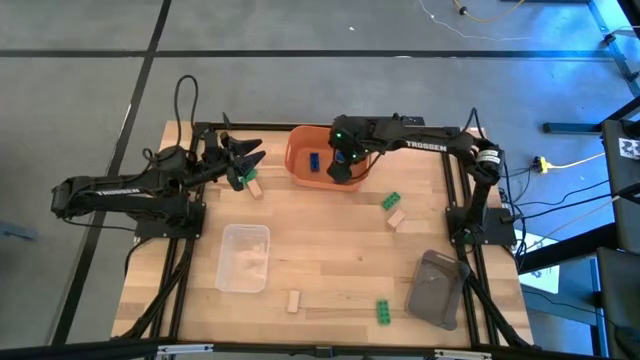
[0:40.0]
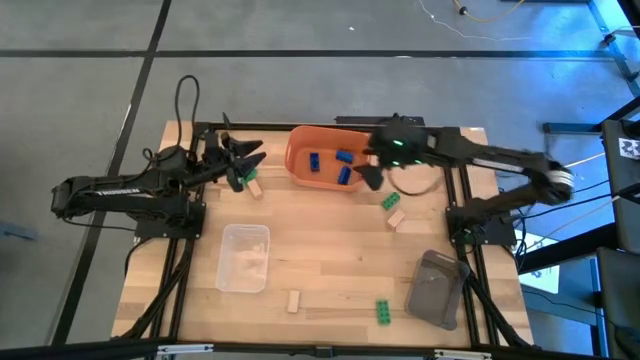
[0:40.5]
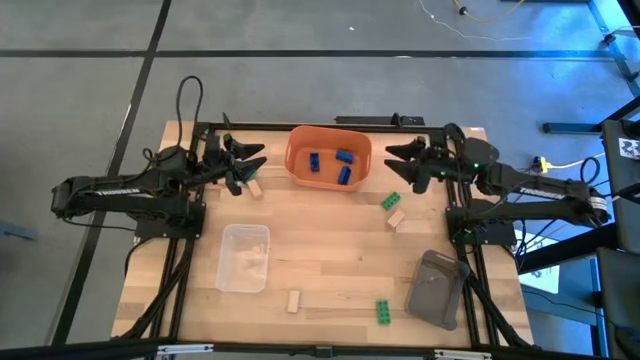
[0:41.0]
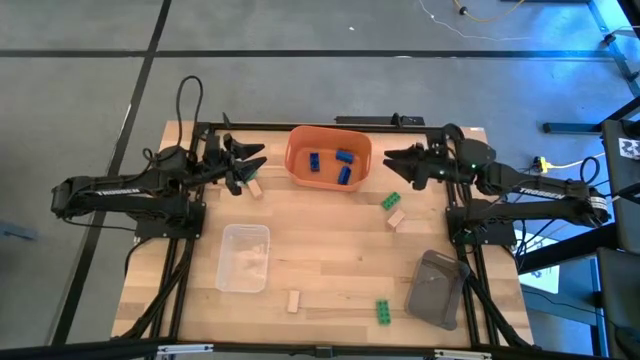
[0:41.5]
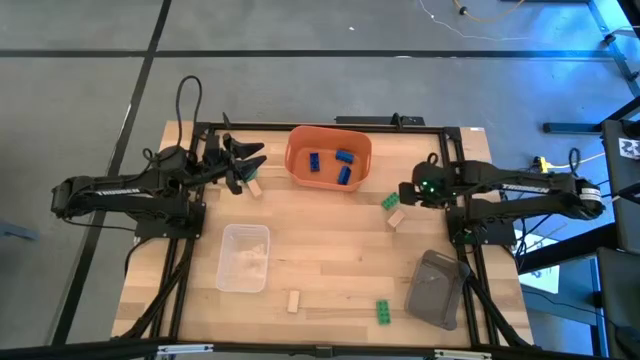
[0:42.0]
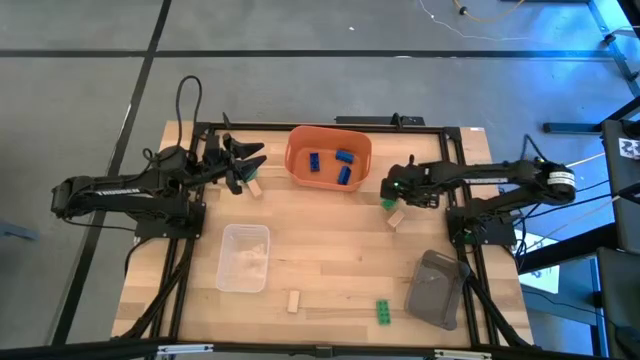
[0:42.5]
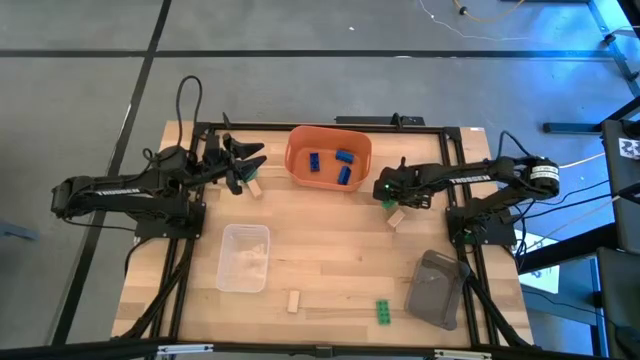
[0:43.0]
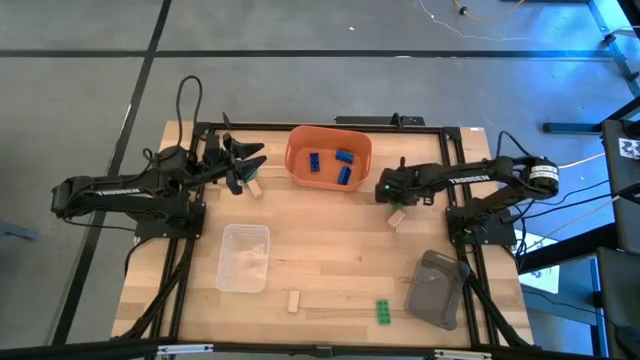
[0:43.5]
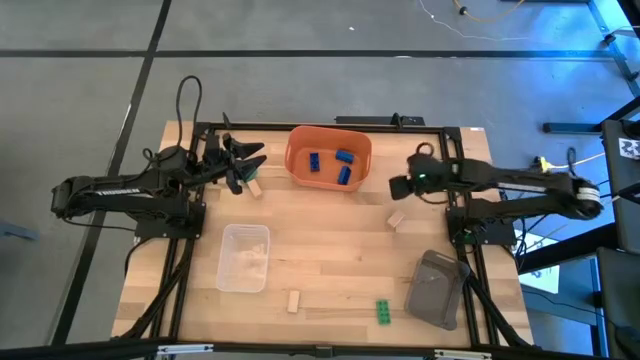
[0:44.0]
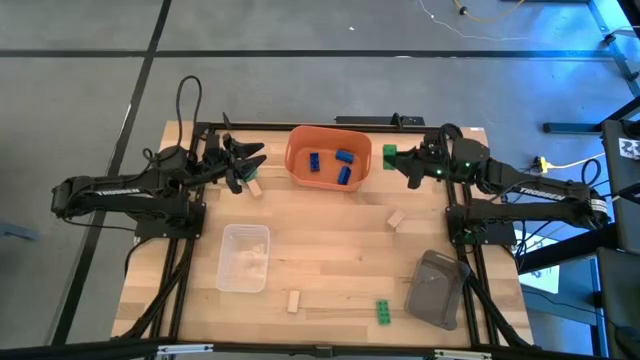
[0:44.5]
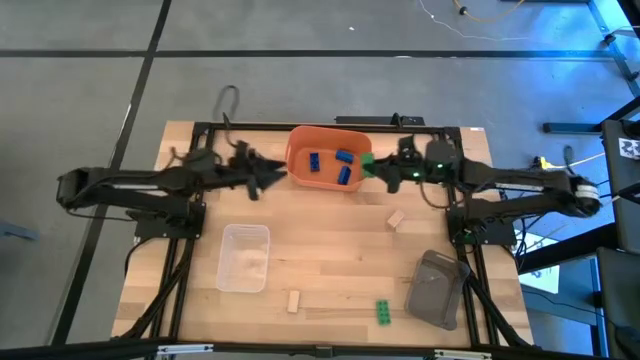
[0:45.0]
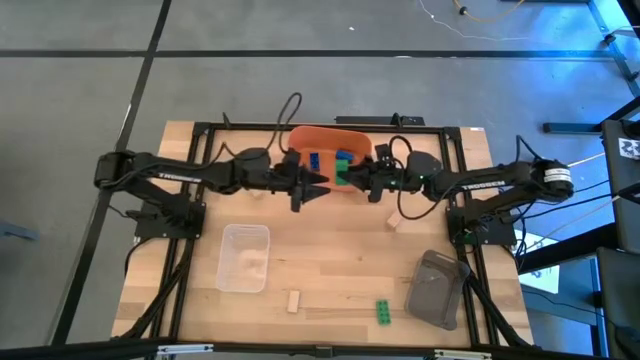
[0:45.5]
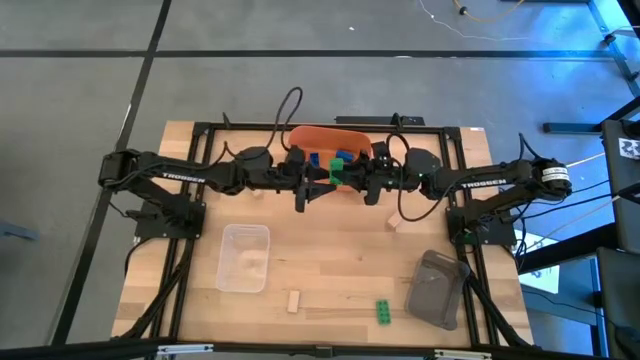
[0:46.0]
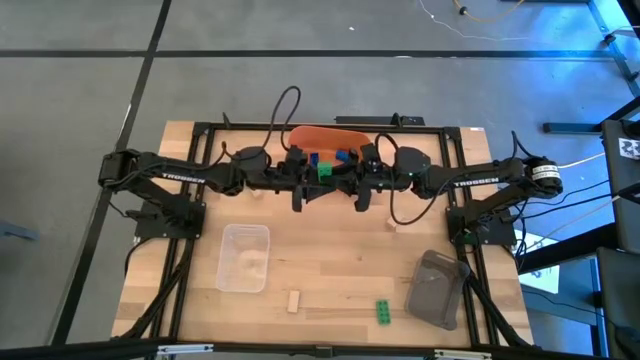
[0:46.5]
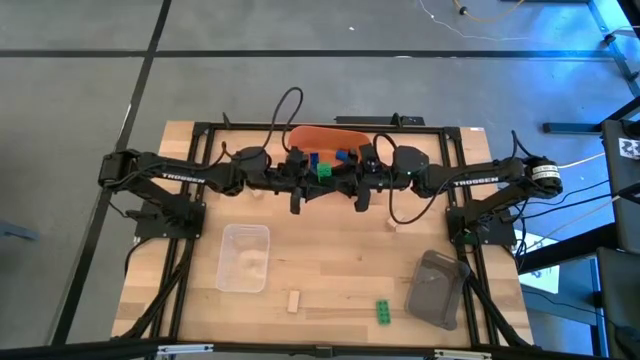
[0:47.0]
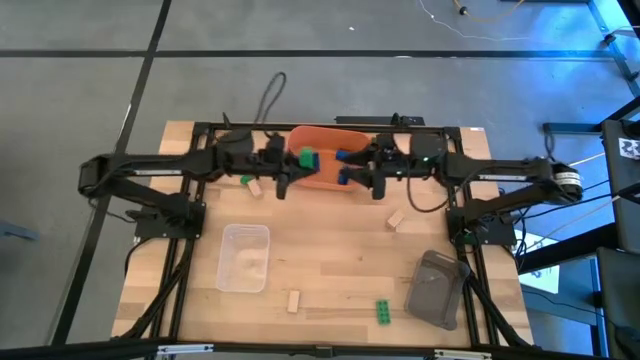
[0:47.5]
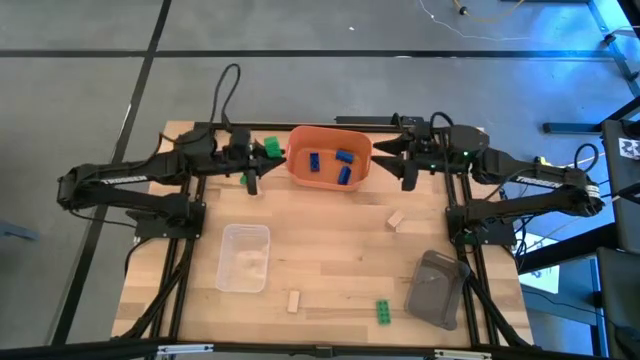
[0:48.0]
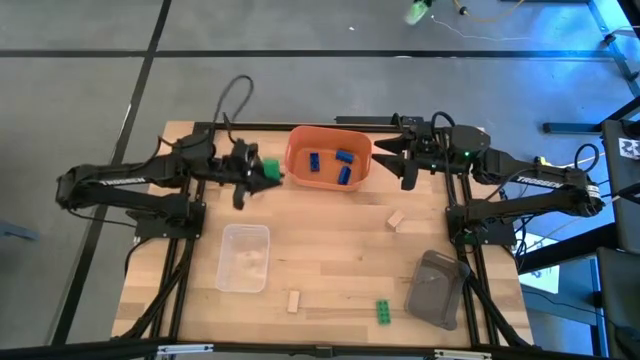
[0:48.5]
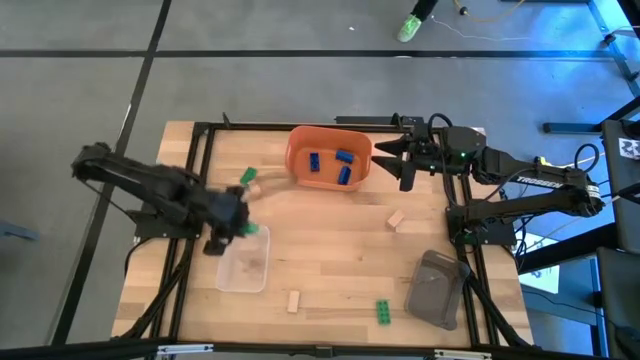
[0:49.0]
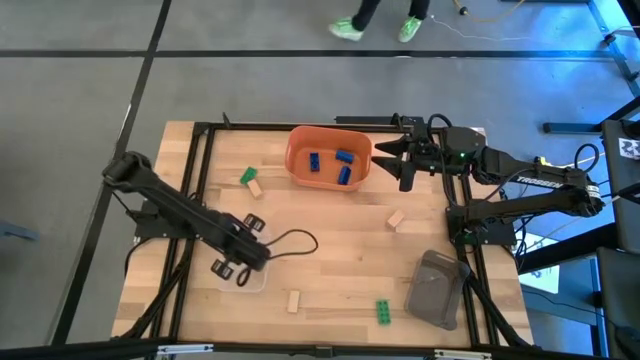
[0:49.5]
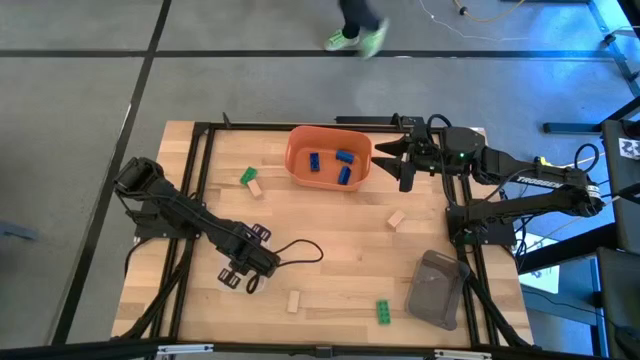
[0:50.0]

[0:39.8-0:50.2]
Task: Sort & place blocks by color
Put the top right green game piece into the transparent bin

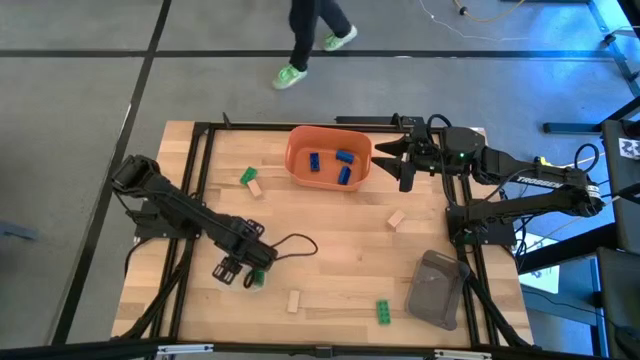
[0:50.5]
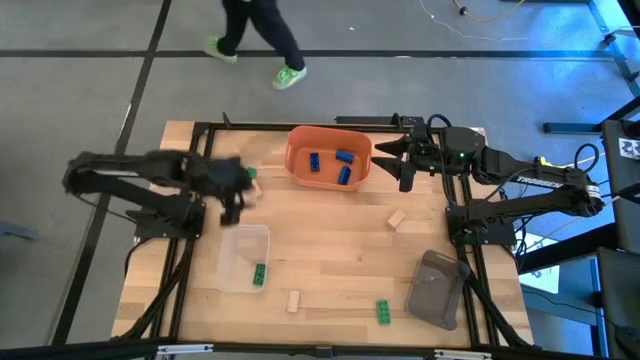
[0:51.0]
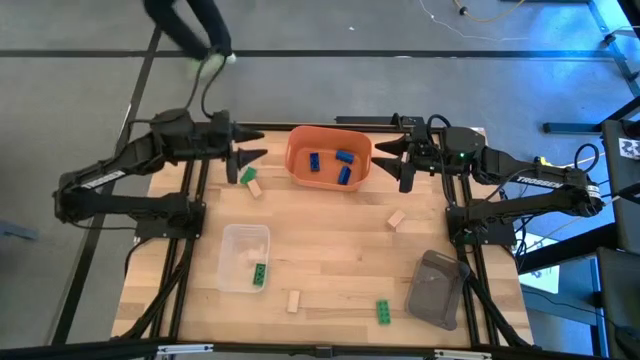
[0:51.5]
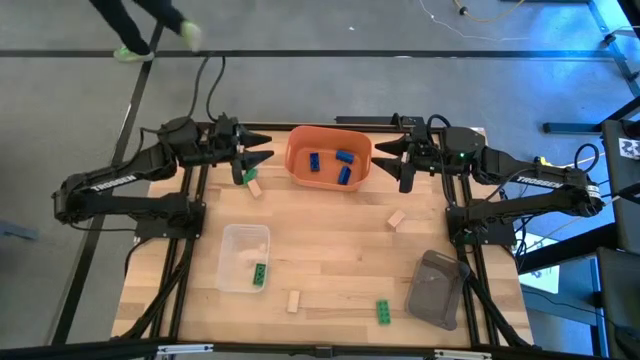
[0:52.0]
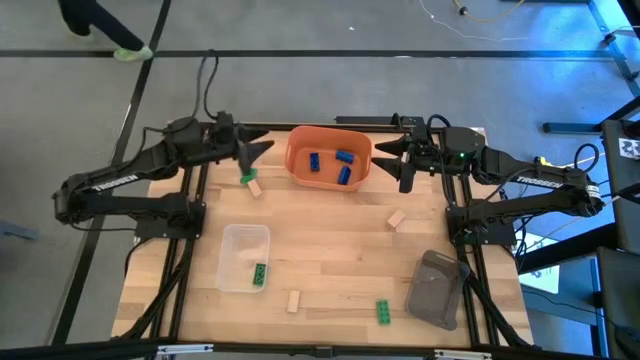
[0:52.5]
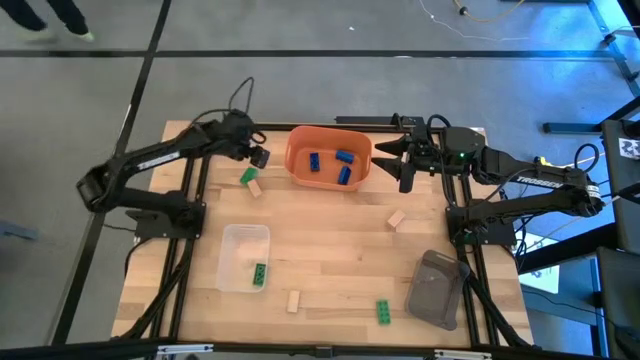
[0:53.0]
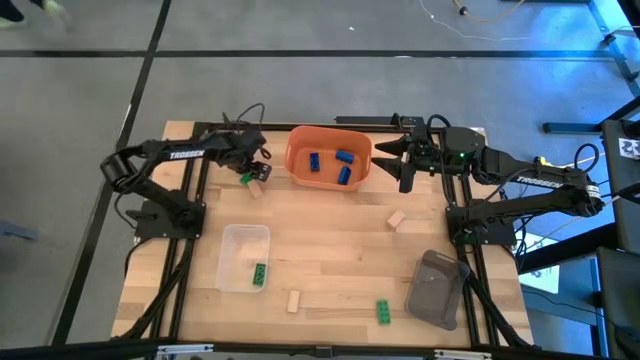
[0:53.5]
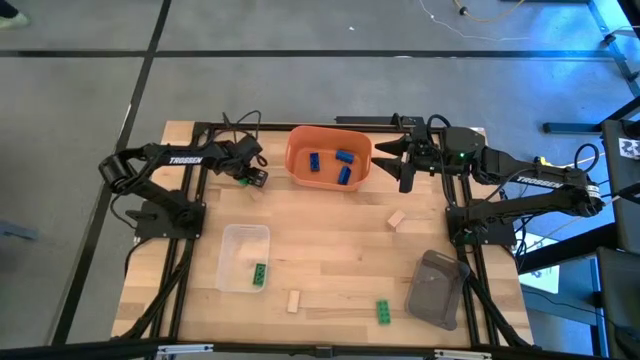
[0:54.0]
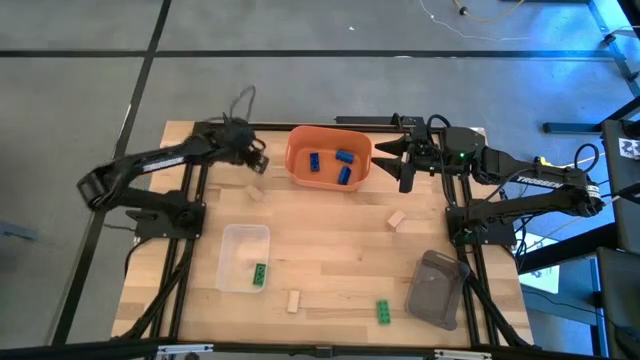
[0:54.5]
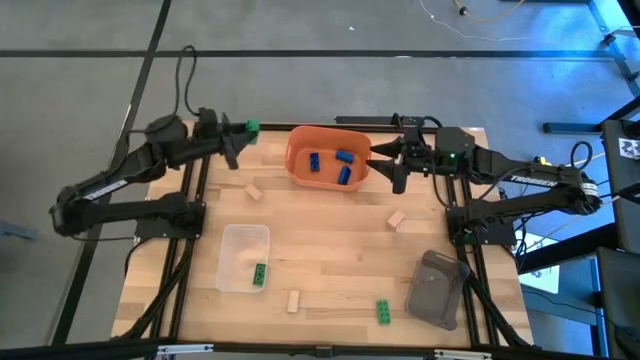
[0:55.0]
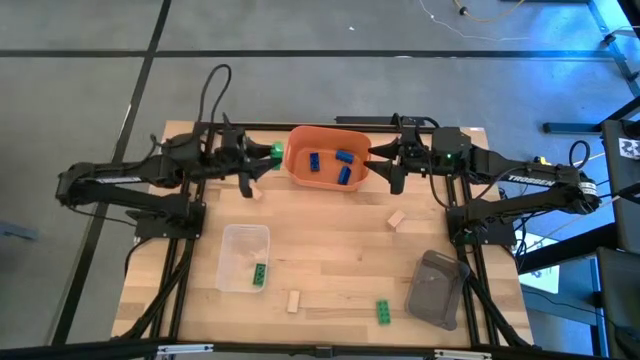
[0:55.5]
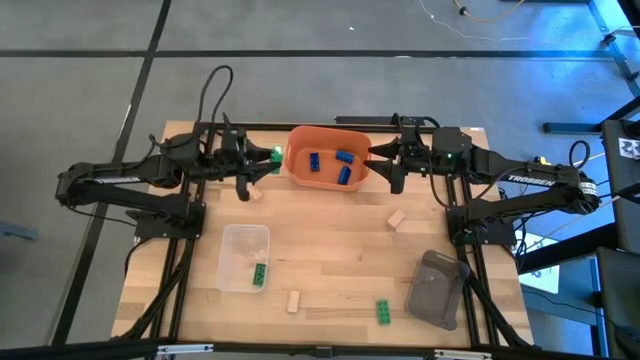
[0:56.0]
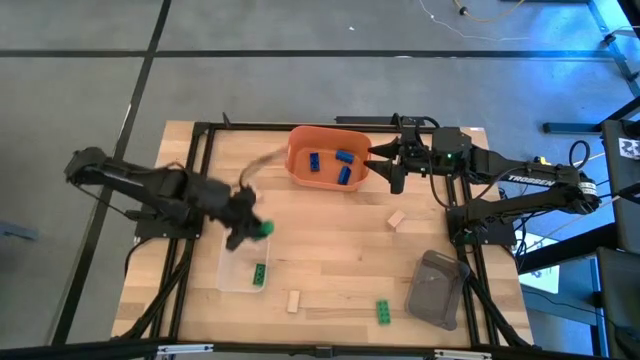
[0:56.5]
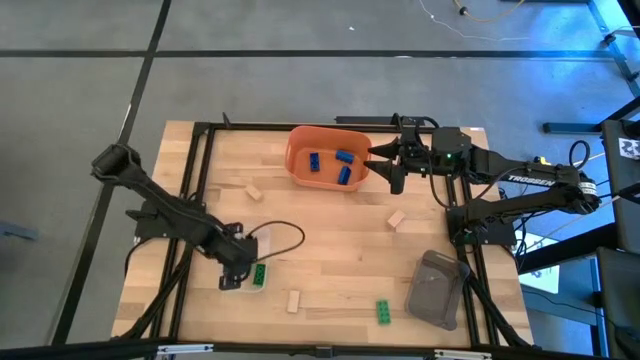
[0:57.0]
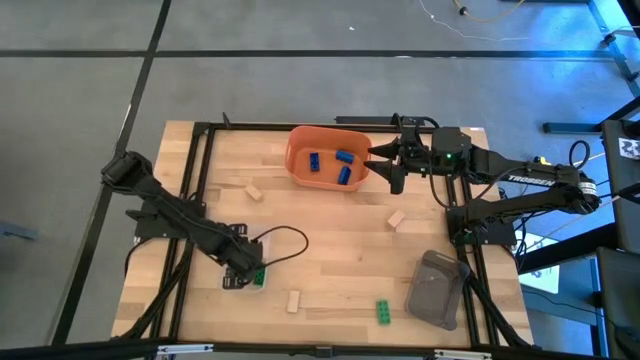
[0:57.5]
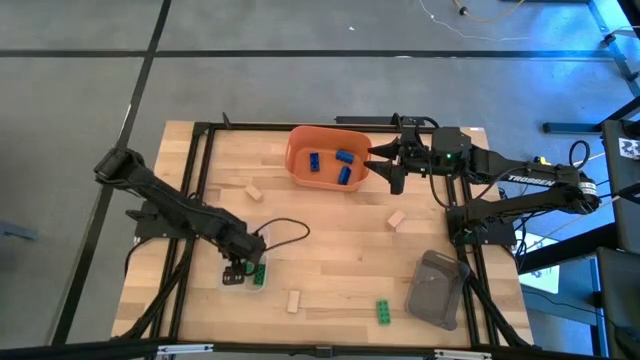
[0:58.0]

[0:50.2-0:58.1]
Put the top green game piece into the transparent bin

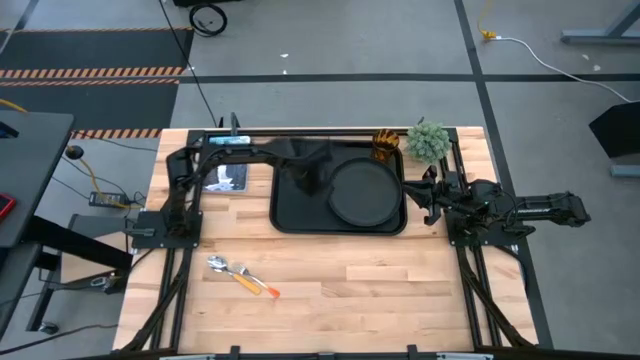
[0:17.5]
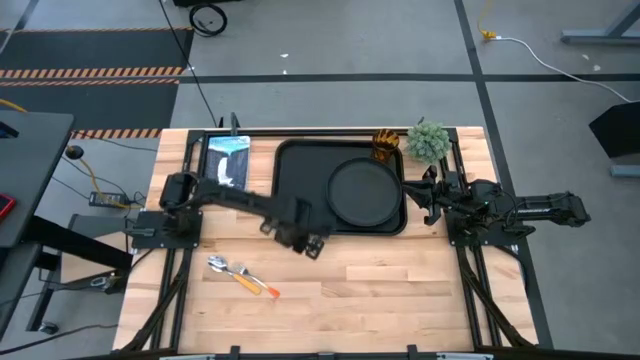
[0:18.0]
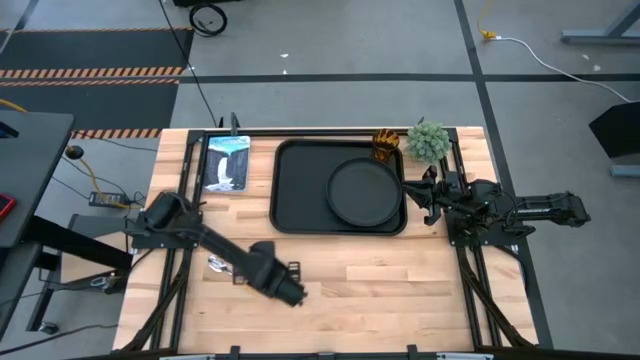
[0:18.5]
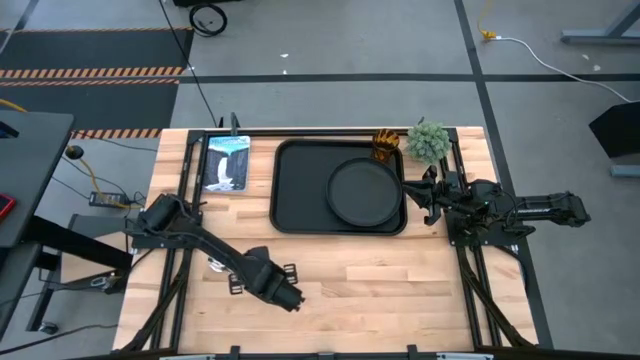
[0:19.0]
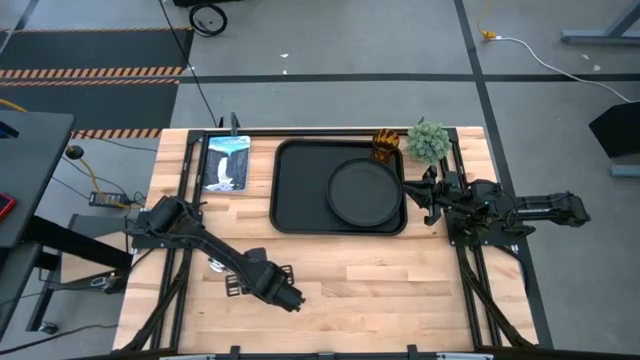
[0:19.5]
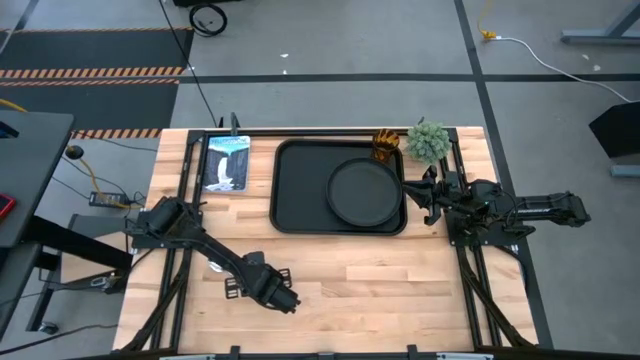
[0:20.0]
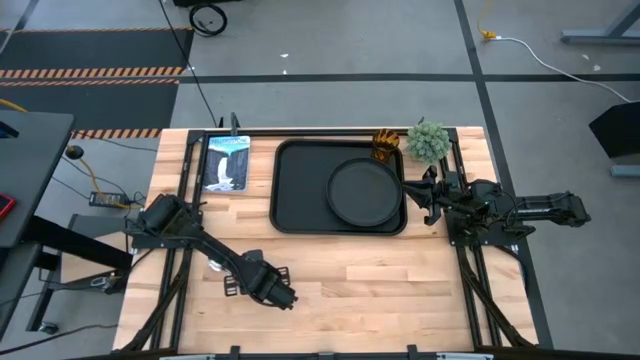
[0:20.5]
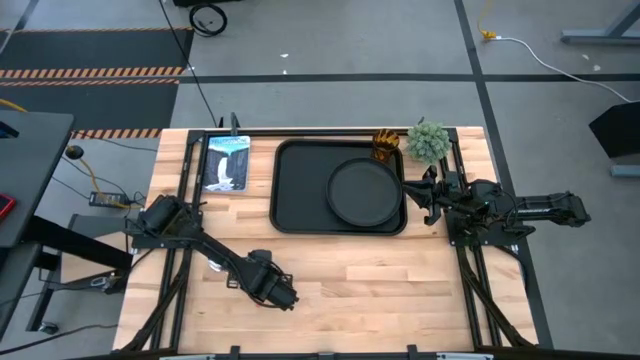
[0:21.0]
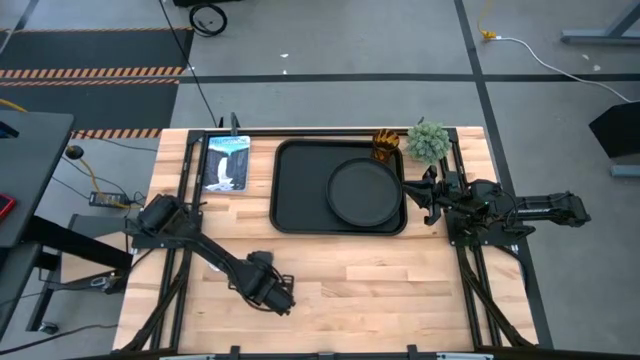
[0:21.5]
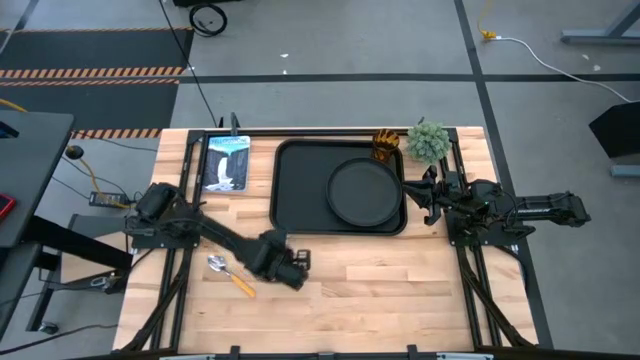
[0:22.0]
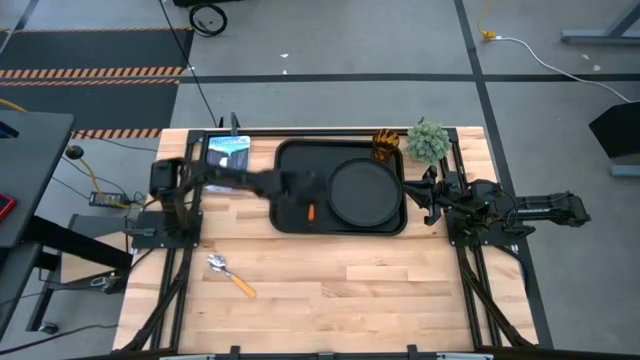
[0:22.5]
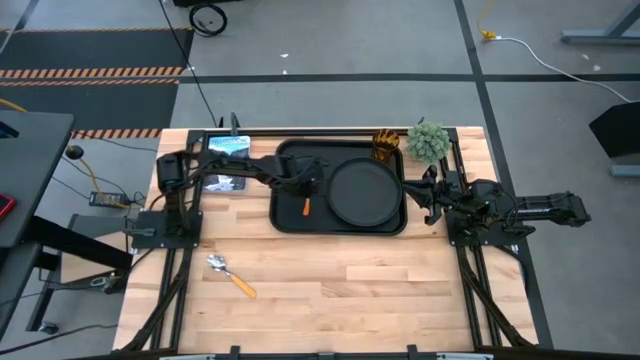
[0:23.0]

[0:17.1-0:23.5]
Task: Pick and place plate/cup/fork/spoon on tray
Put the orange fork onto the black tray
